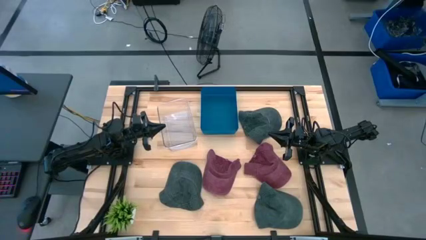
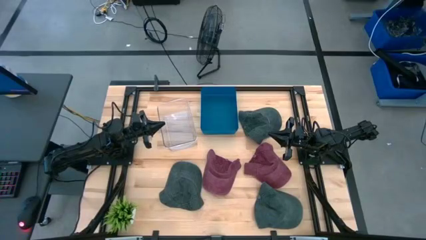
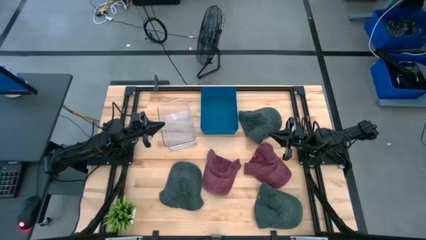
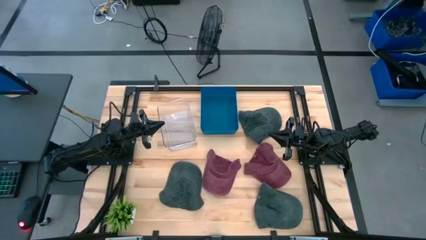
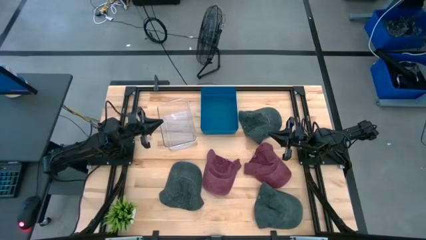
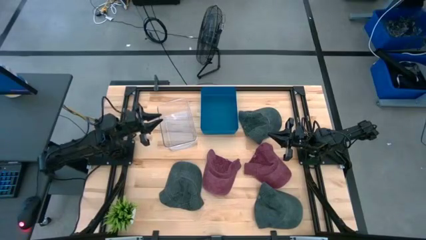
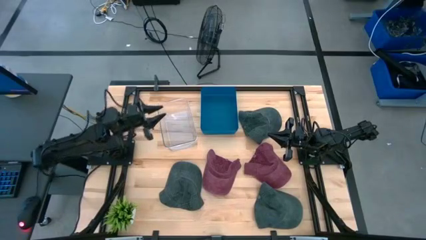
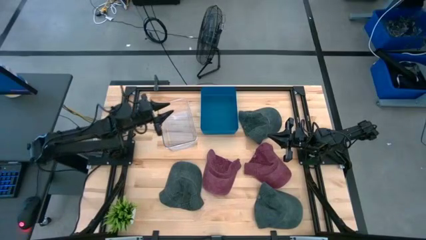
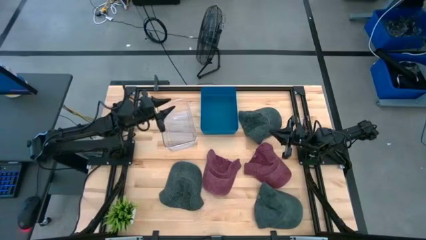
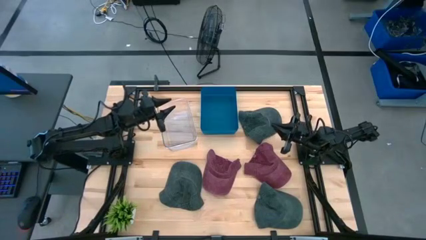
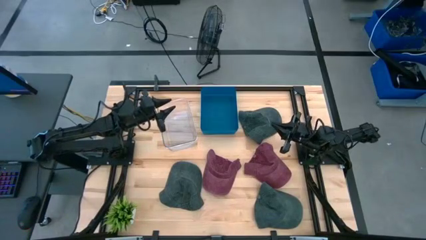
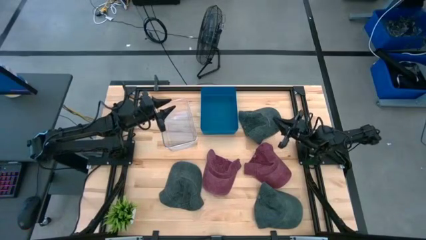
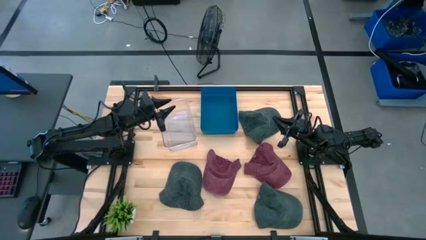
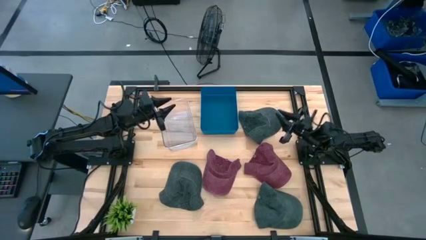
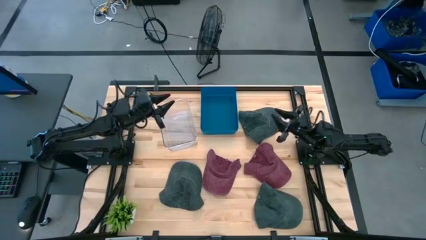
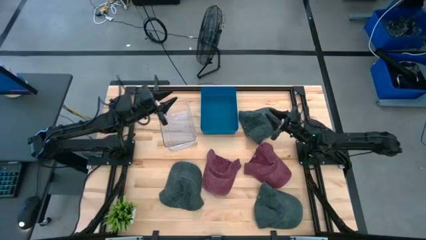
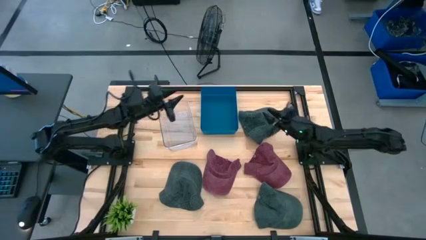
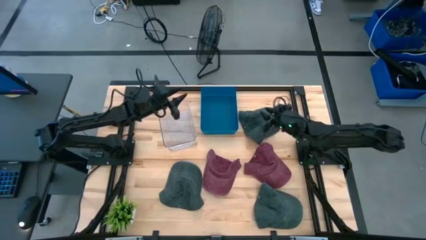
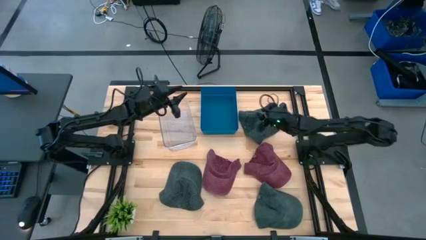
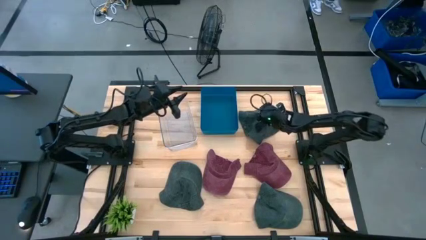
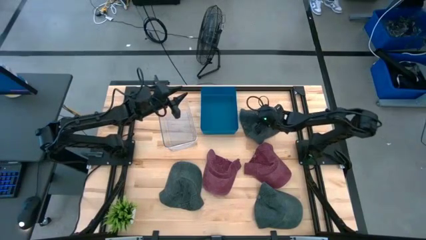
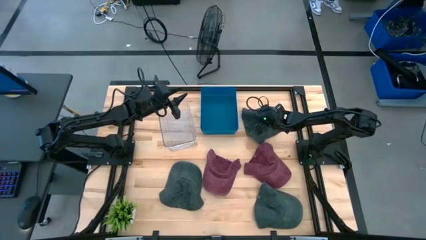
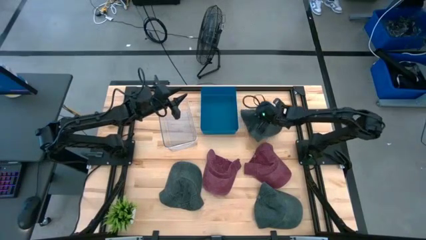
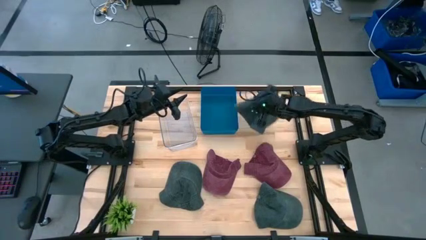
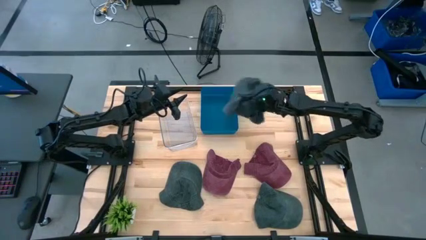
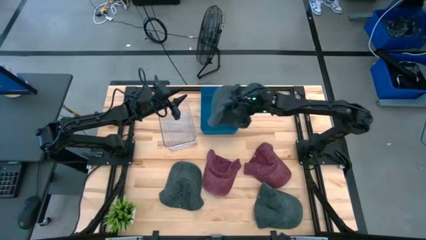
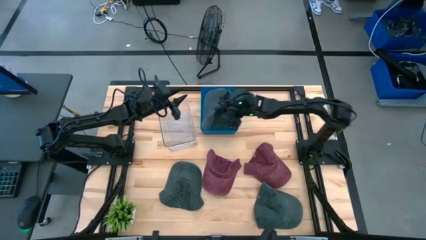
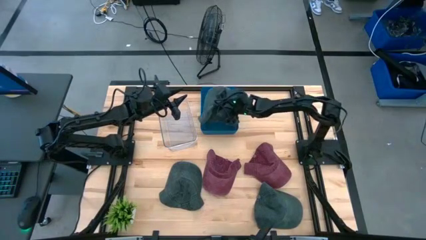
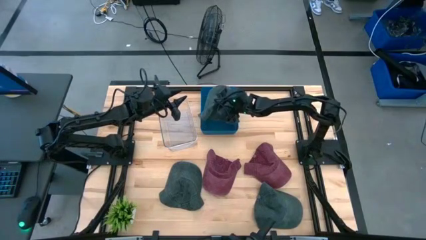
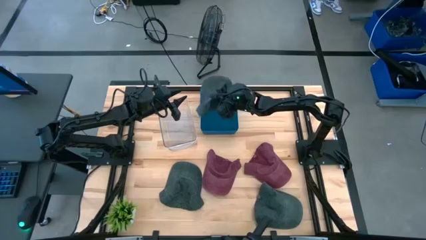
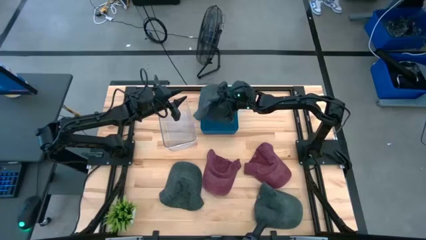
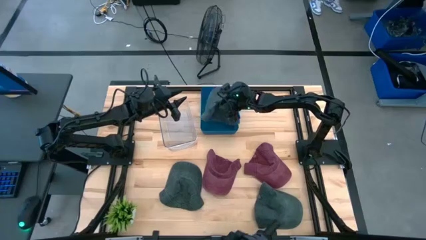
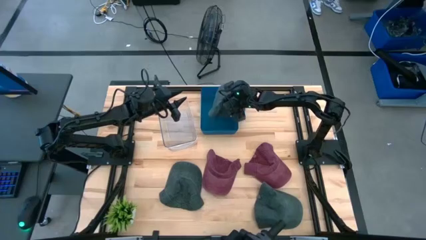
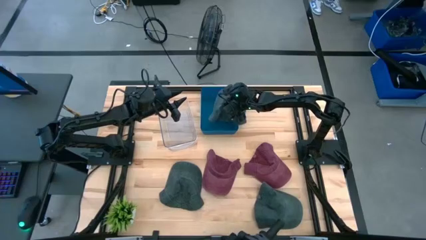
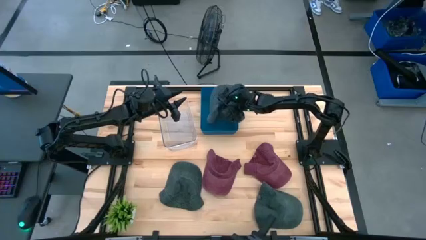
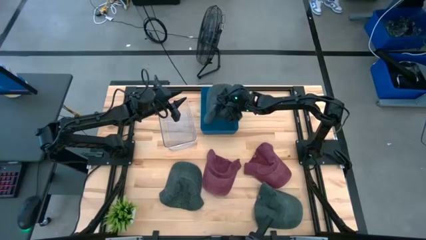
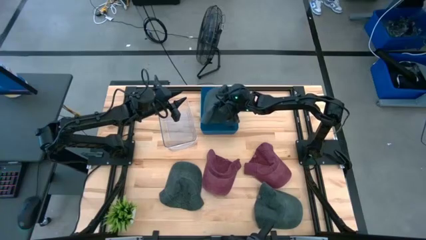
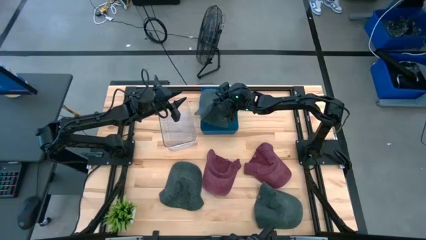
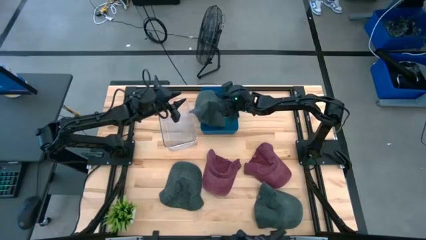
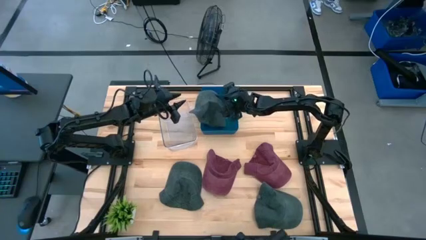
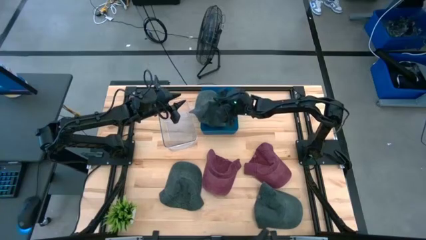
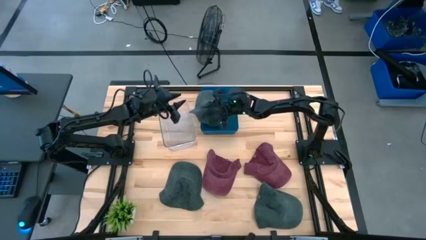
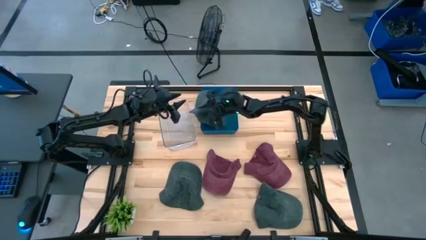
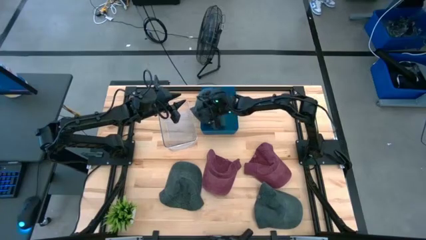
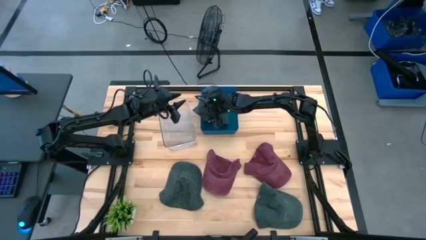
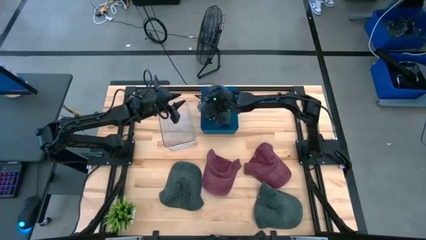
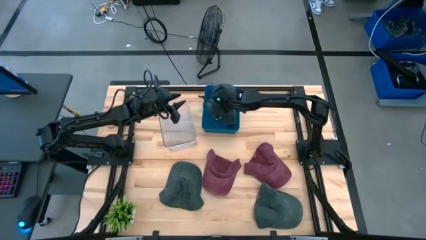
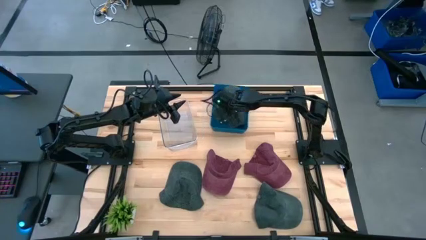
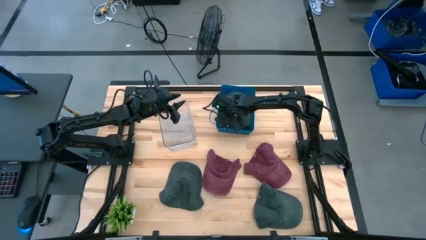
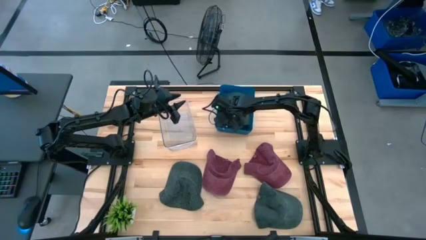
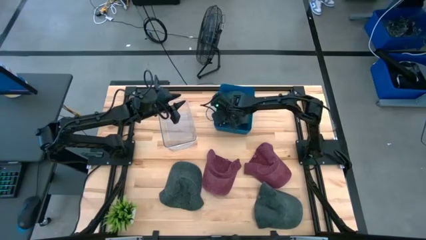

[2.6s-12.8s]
Task: Pick & Place hat
Put the top gray cap into the blue bin

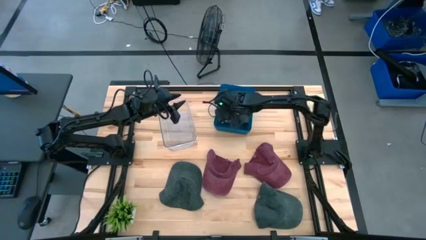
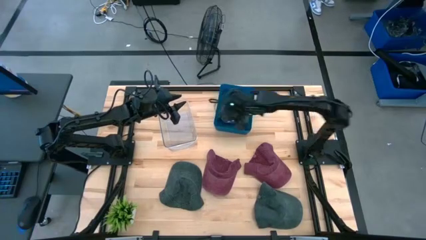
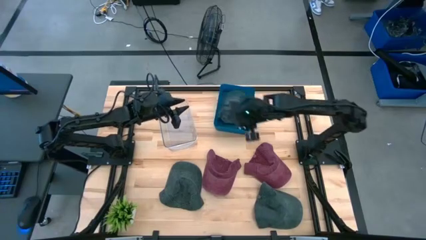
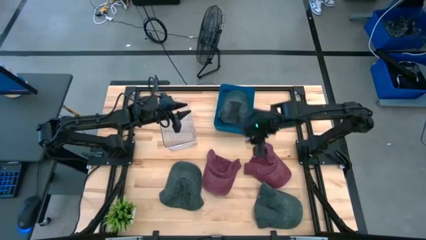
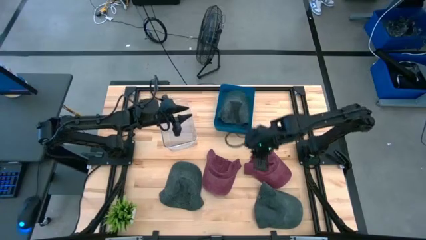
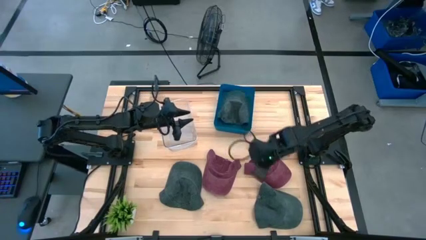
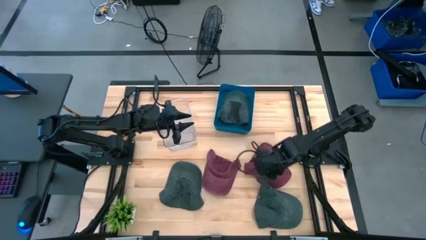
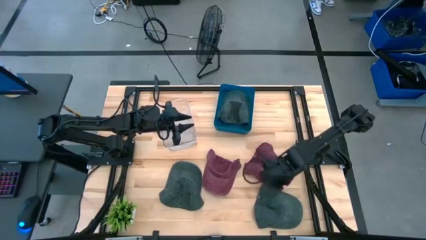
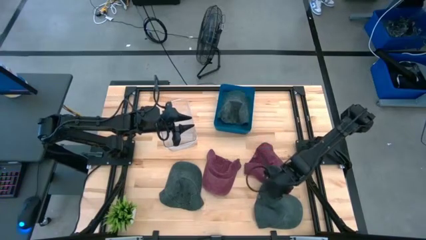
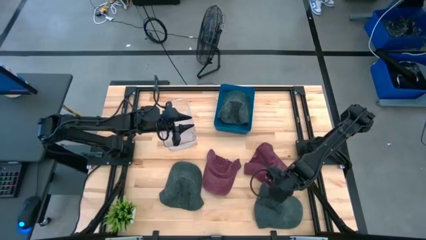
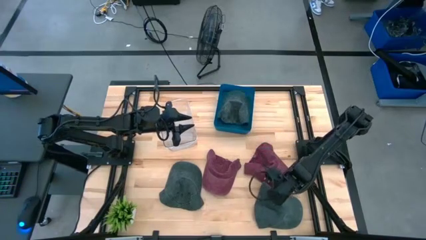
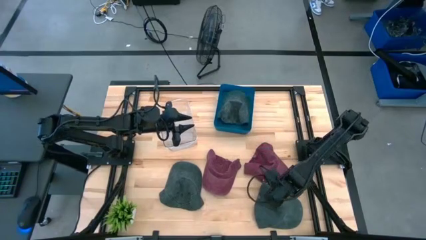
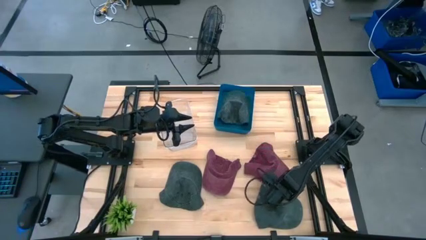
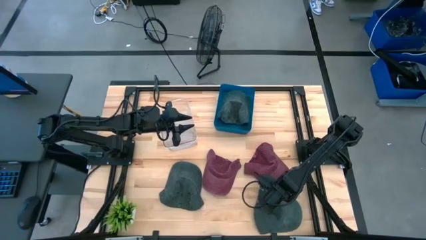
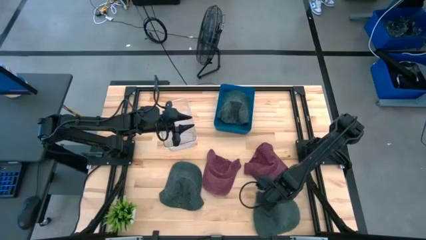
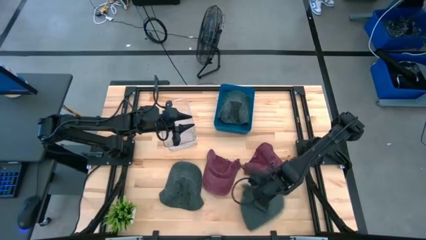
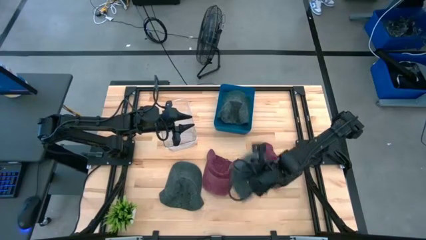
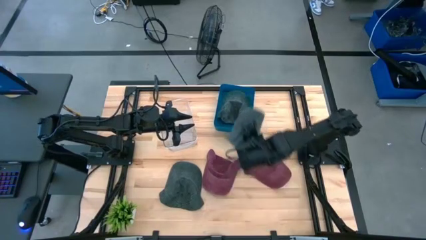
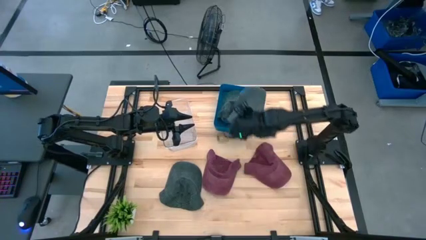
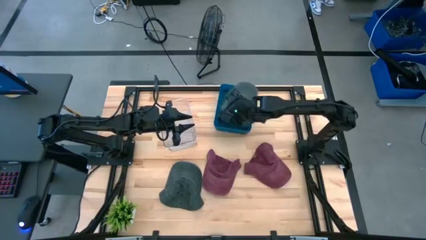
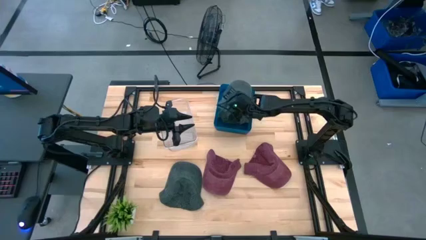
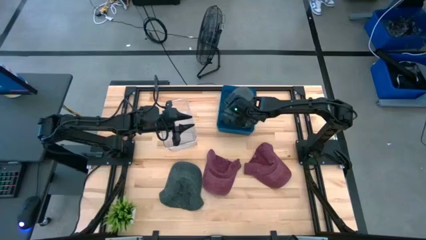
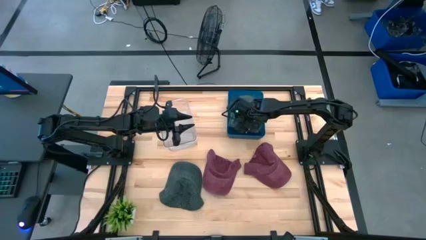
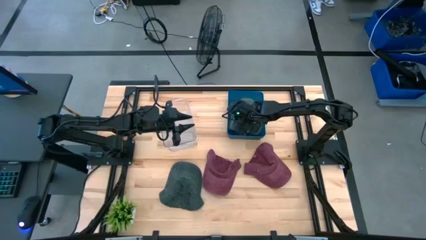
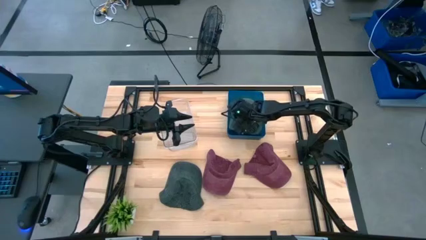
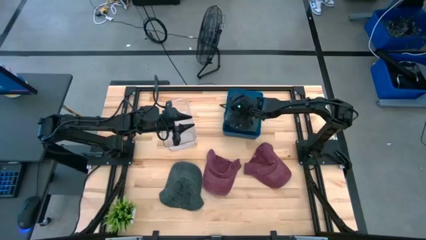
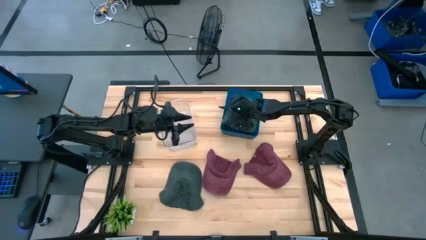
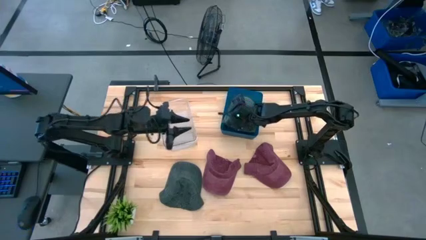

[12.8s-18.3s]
Put the right gray cap into the blue bin
